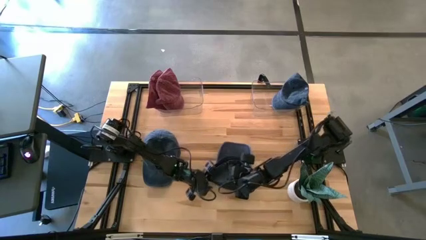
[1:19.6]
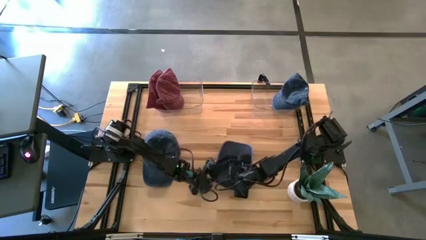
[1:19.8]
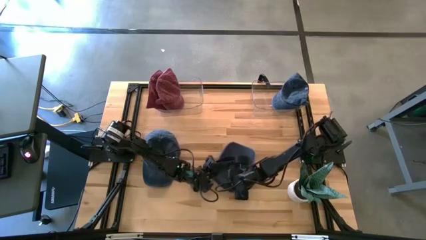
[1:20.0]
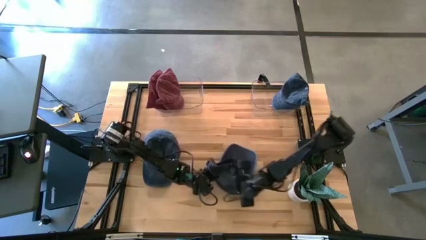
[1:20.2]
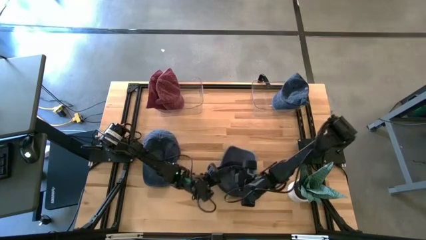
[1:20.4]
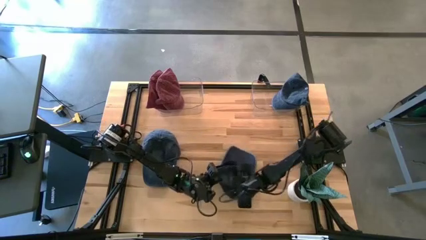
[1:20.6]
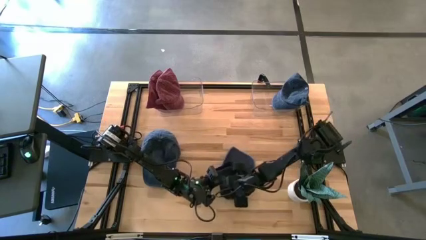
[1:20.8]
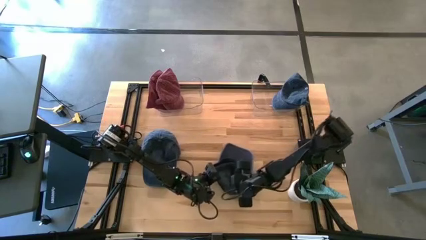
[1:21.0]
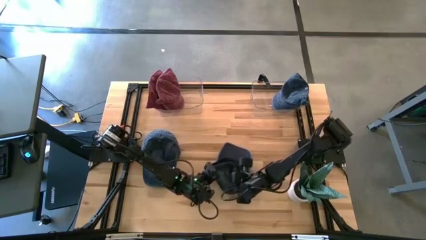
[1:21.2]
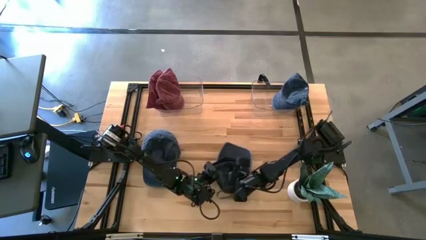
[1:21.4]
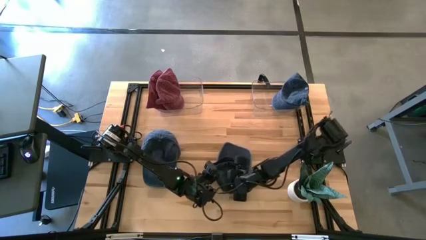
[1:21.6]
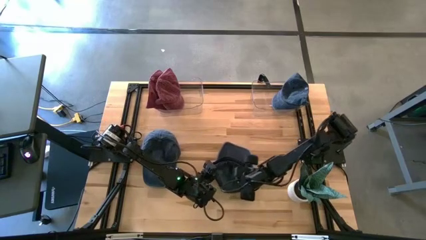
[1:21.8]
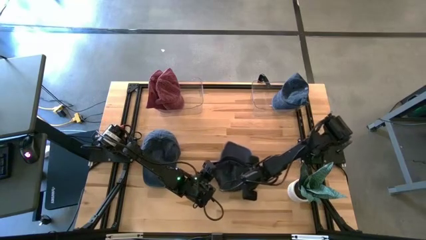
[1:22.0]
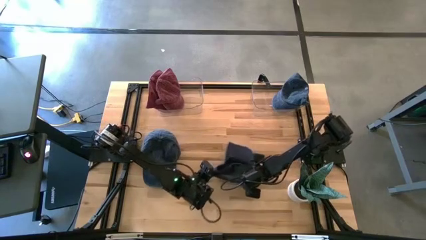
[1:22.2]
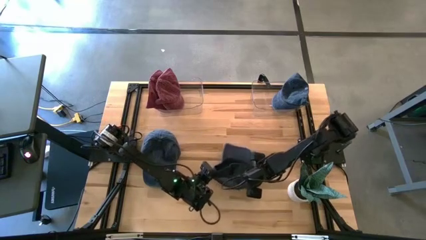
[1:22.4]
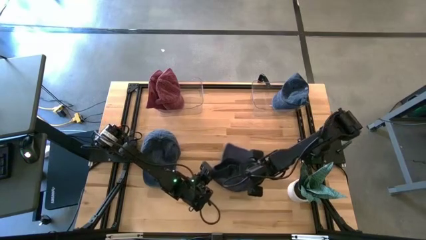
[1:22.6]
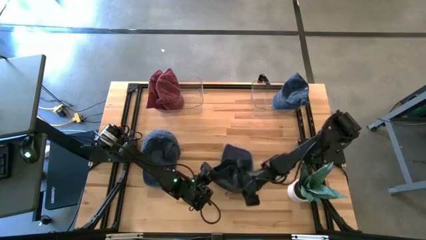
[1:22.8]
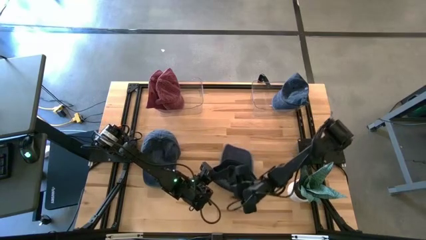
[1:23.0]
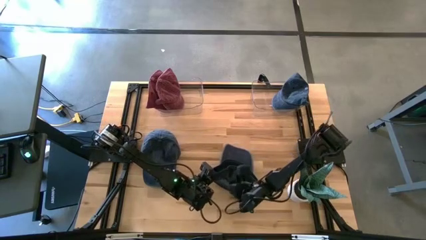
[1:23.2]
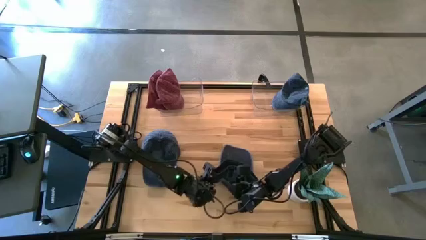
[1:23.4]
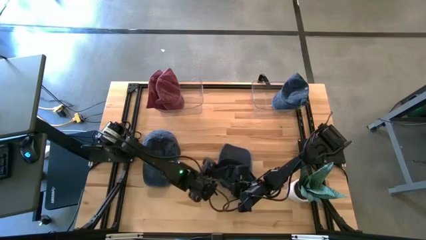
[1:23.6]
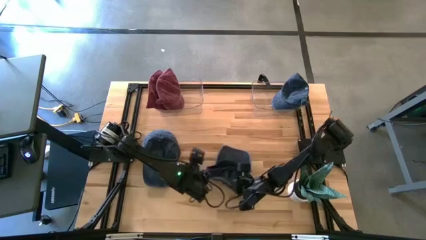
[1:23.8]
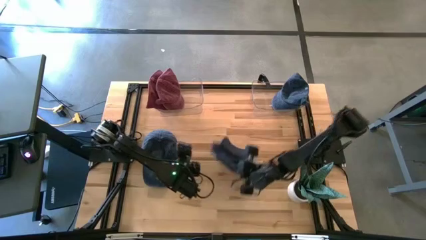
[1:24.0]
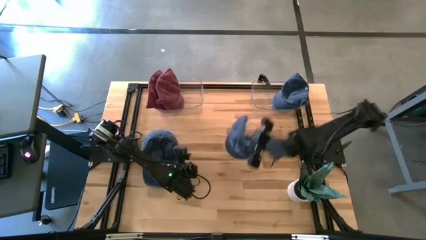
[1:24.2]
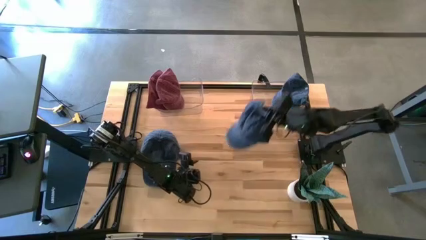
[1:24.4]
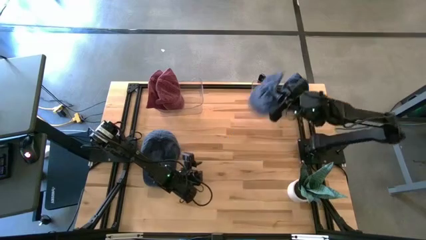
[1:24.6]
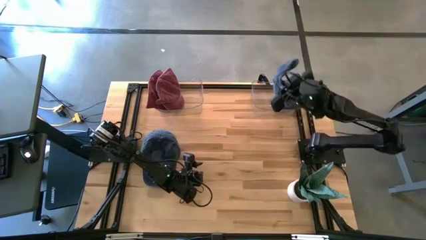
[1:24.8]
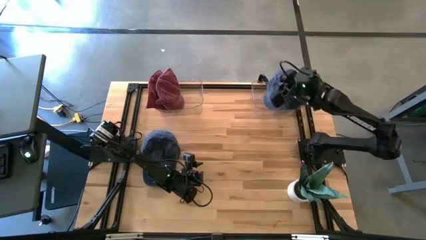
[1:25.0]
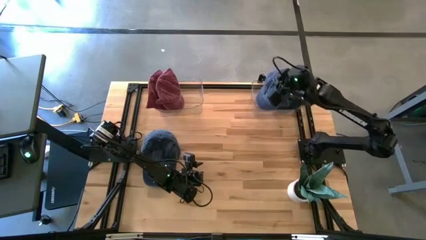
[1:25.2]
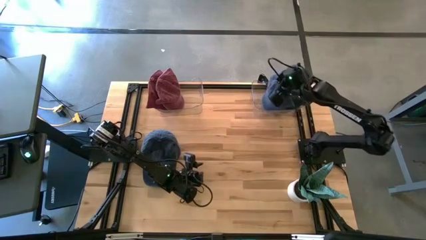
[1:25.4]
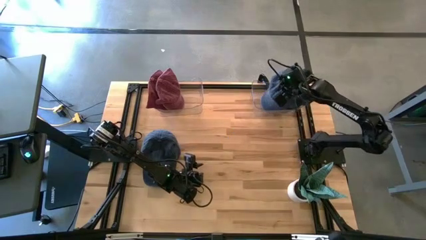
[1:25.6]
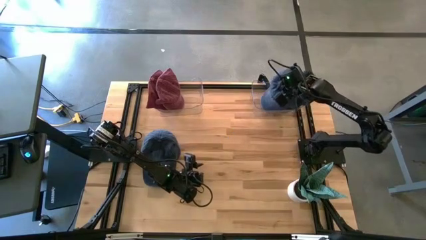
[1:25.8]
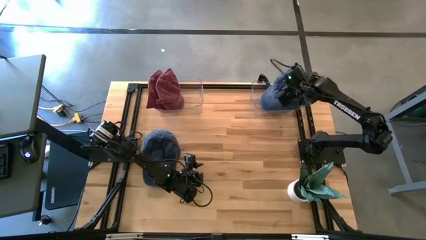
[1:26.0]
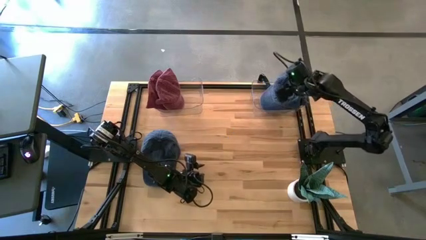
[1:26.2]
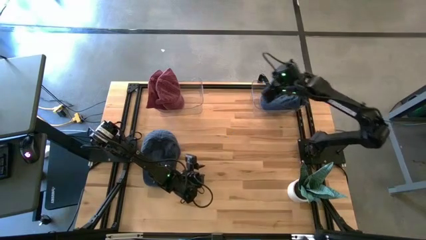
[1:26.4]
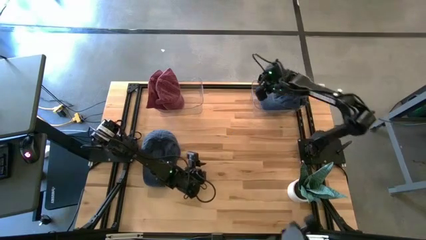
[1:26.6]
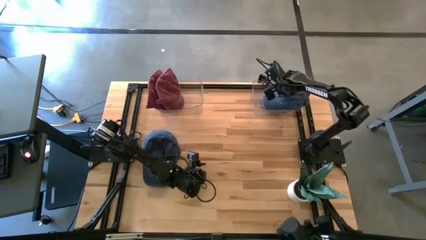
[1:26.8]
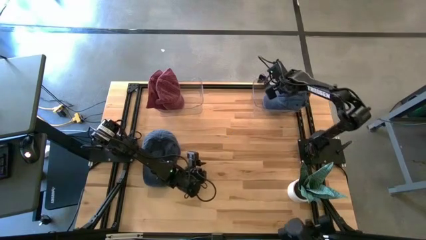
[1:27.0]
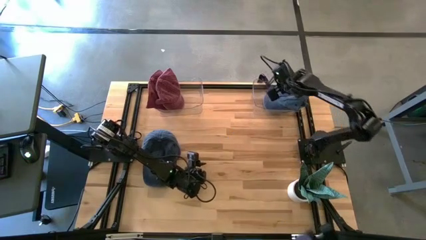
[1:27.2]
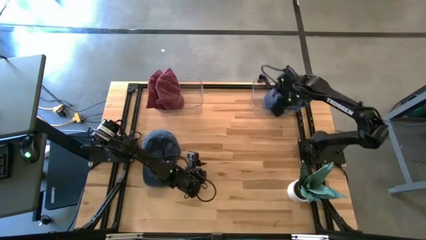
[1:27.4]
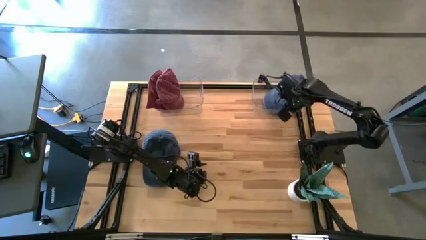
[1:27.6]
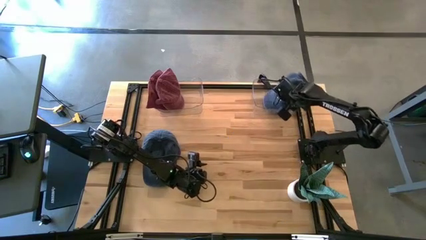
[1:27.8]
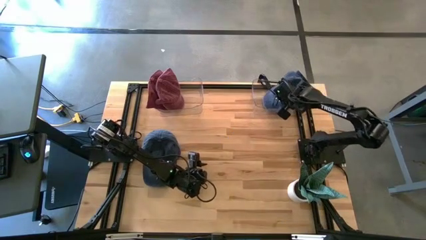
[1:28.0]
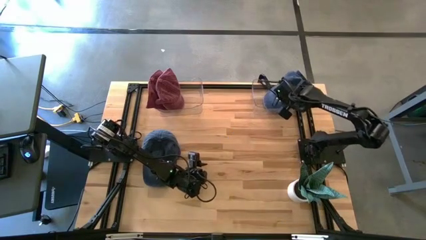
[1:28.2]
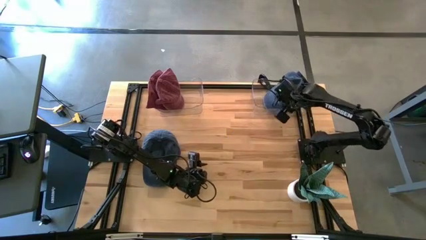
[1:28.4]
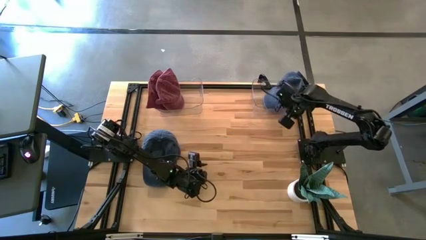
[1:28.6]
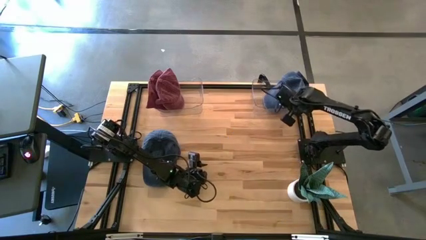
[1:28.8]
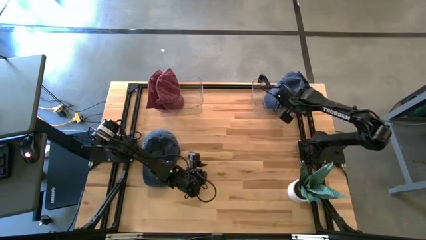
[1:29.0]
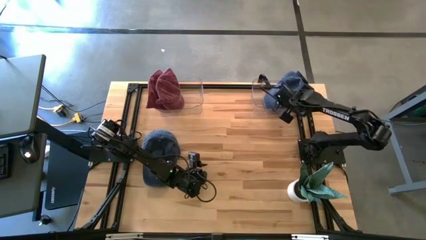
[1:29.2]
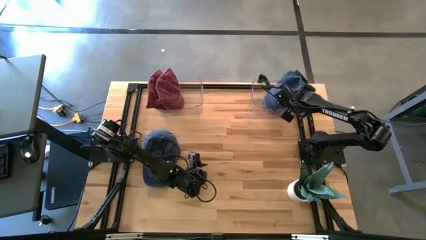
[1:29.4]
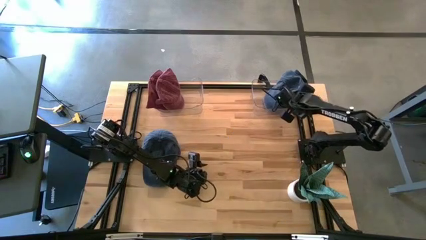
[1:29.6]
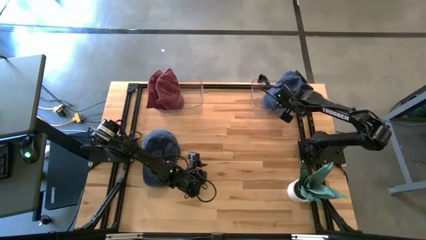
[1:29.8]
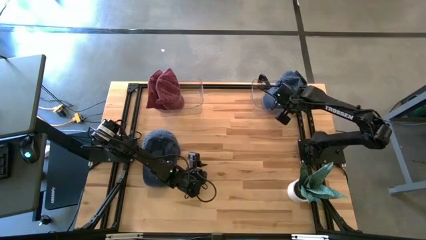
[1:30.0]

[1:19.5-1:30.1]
Task: Pick & Place hat
Put the top blue cap into the right transparent bin

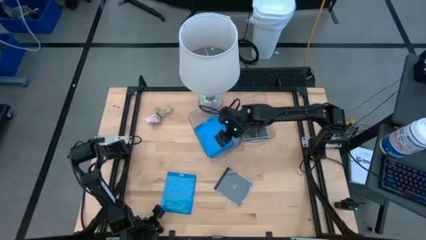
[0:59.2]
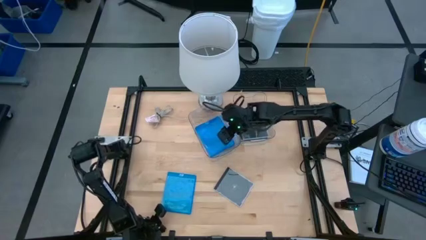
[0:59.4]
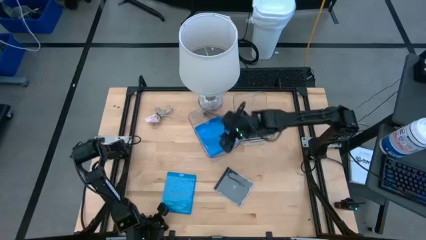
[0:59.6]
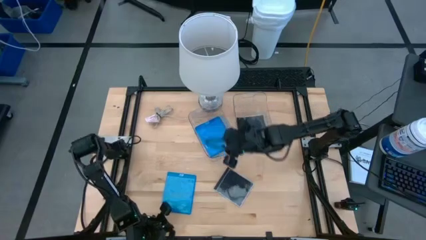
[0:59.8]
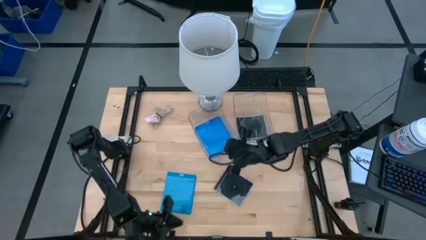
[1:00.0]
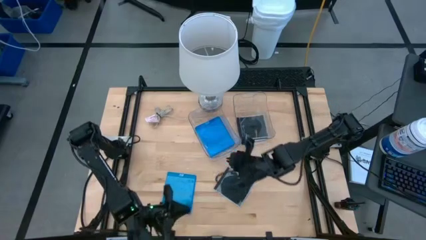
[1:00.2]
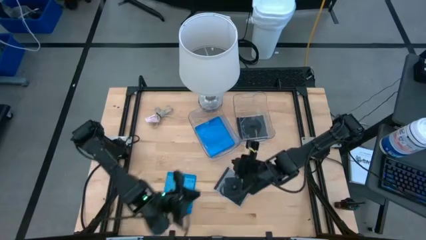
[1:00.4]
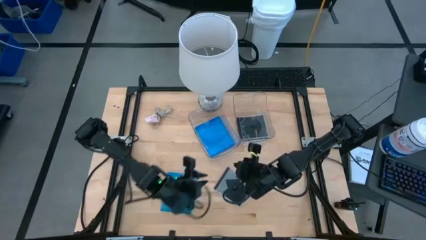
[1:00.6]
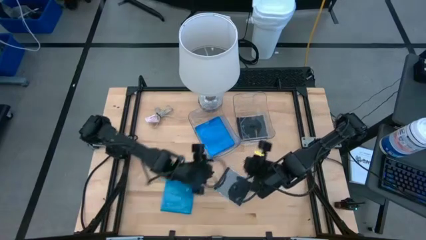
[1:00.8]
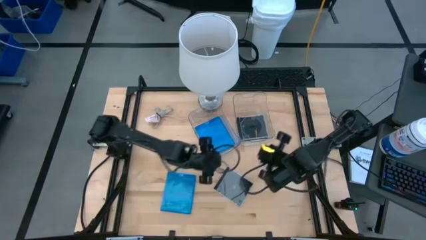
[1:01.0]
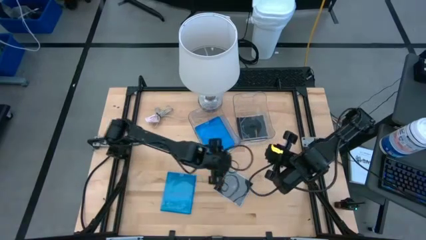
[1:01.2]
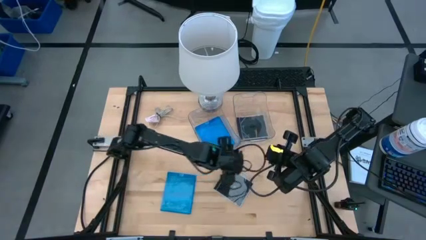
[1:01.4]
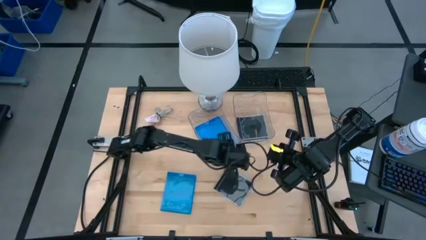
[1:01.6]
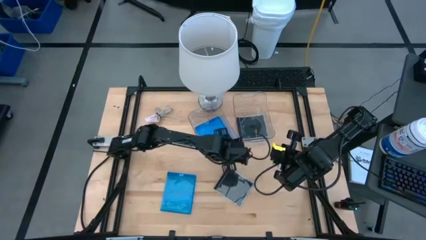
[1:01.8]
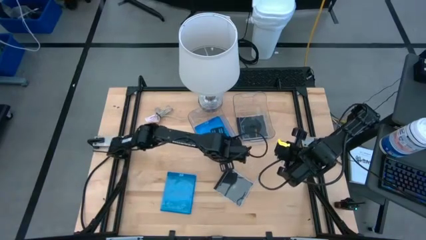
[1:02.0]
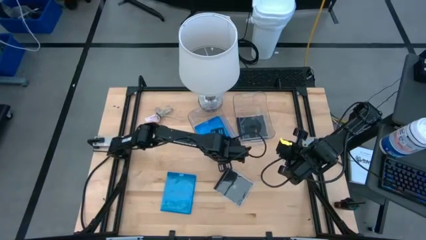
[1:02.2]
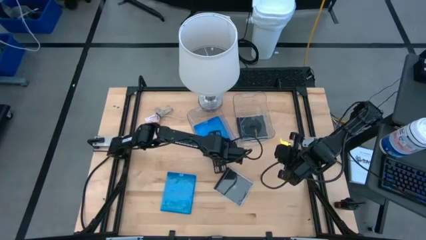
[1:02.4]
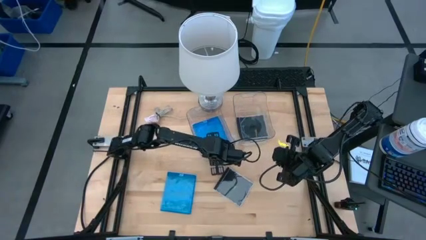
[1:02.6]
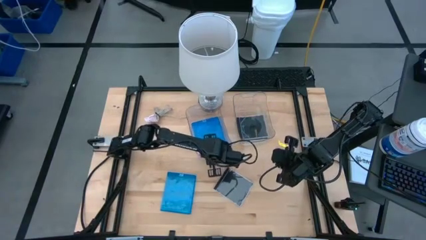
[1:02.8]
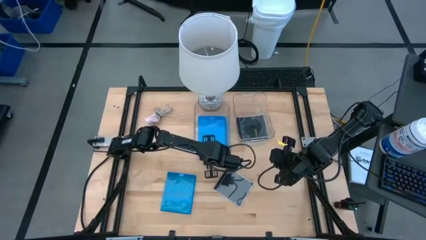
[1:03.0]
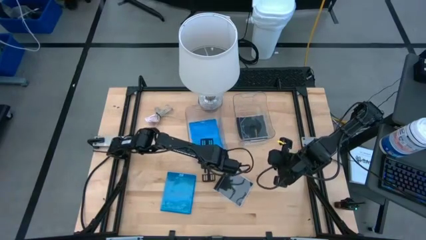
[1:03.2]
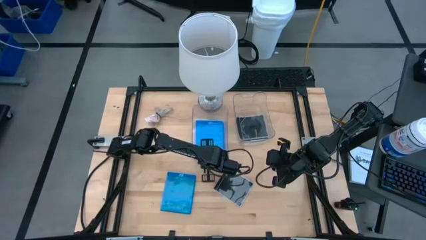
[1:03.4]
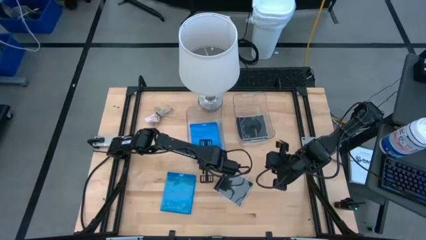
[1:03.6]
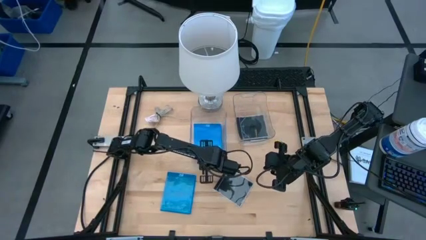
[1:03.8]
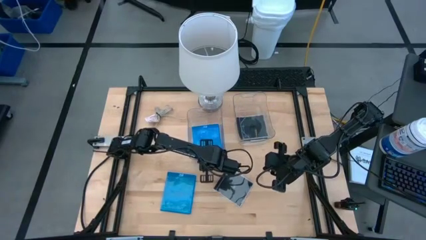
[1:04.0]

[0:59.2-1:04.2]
Task: Pick & place jewel cases by type
Adjust the left transparent bin

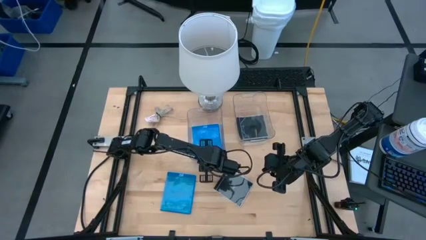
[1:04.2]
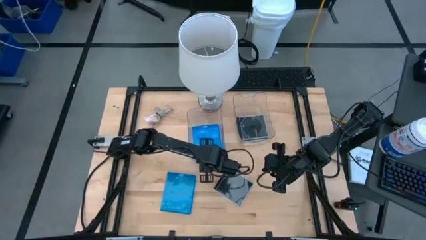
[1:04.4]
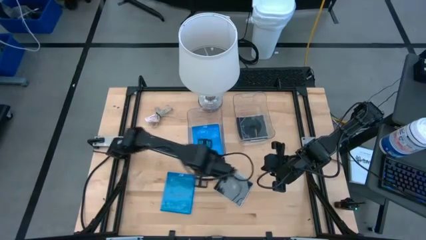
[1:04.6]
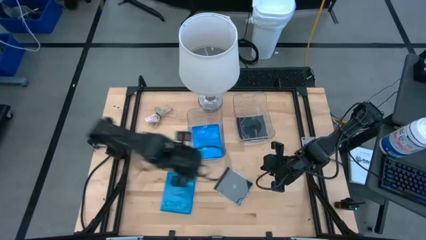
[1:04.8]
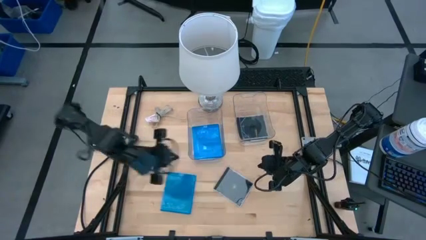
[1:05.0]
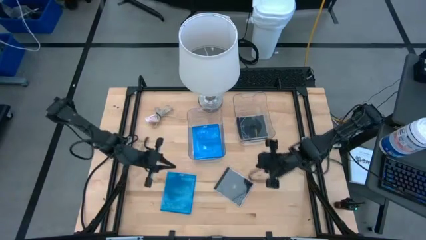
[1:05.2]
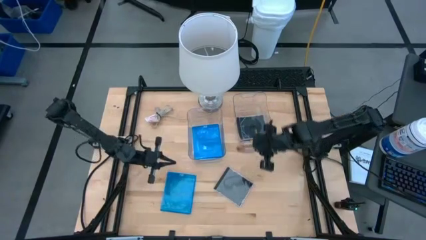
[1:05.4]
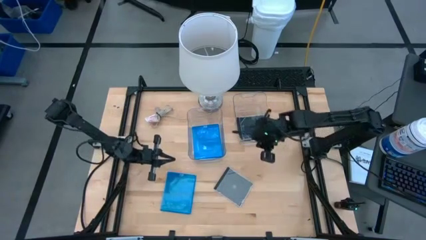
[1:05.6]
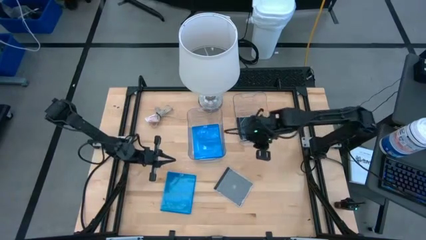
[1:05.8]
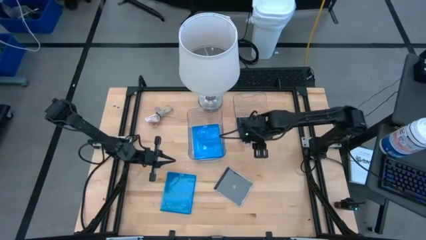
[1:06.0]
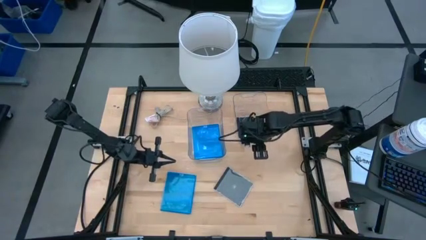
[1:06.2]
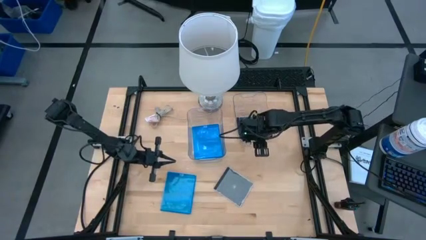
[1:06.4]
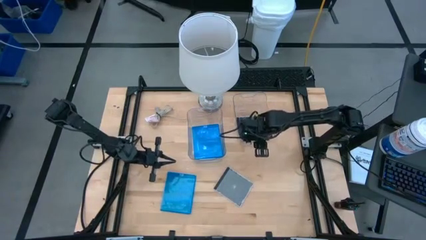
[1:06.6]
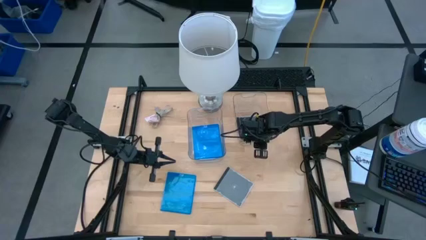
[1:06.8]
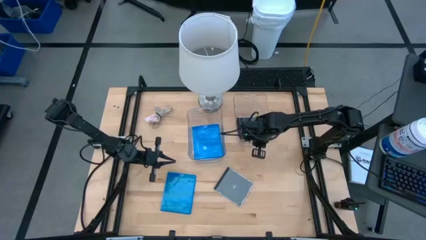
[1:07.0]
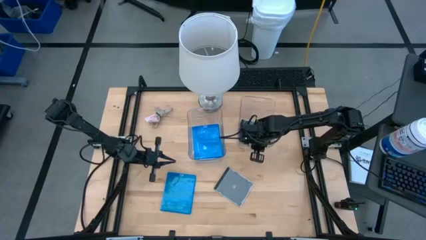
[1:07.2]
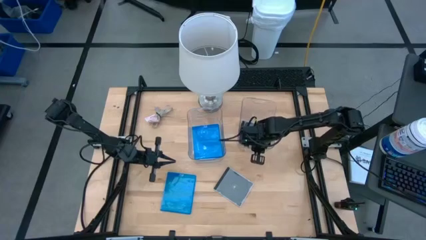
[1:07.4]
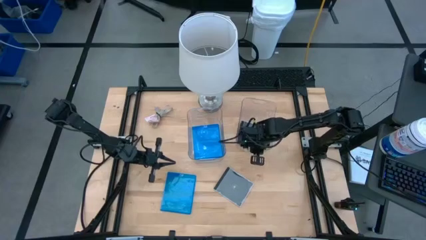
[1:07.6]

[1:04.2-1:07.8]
Adjust the right transparent bin
